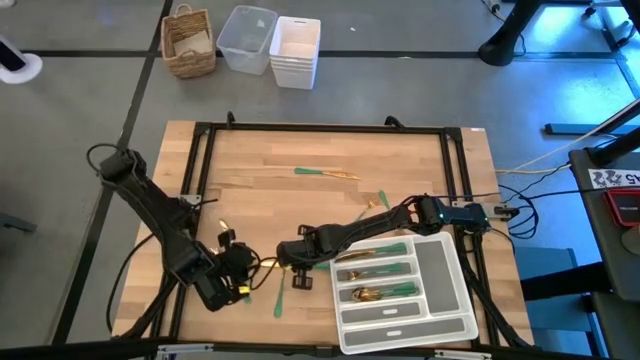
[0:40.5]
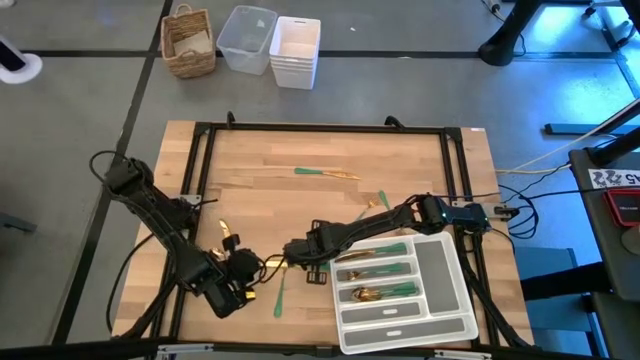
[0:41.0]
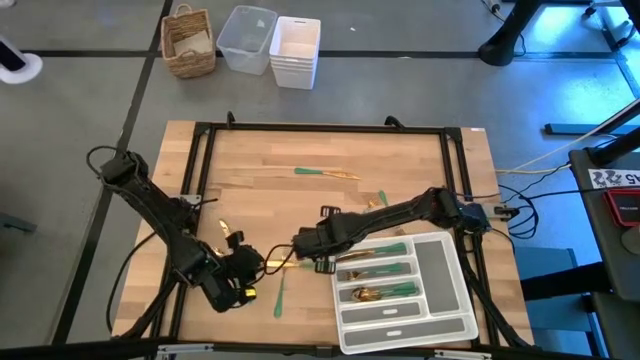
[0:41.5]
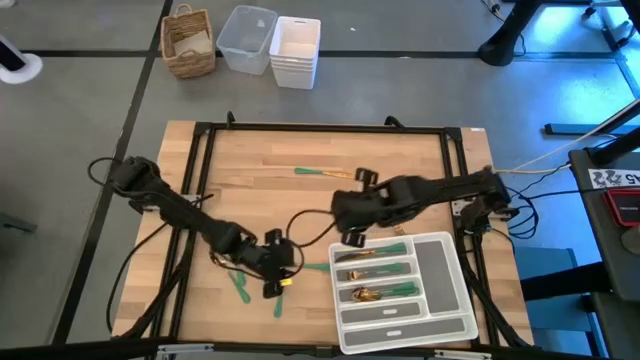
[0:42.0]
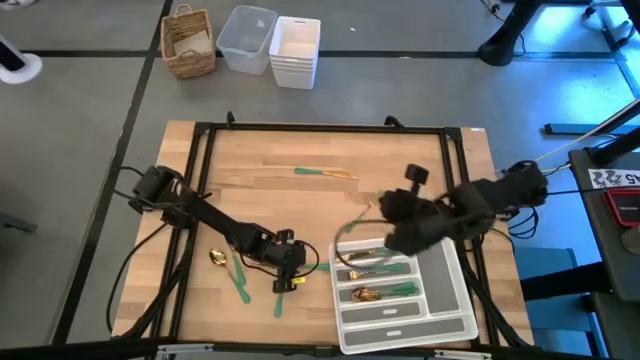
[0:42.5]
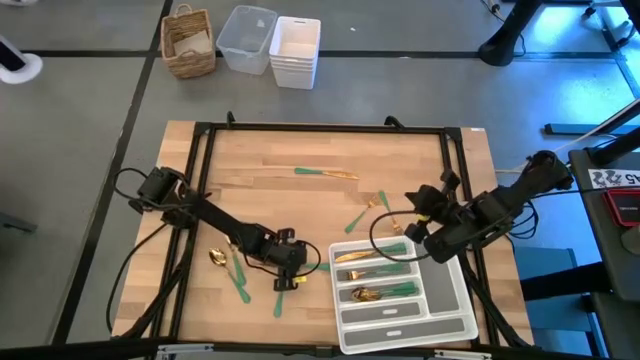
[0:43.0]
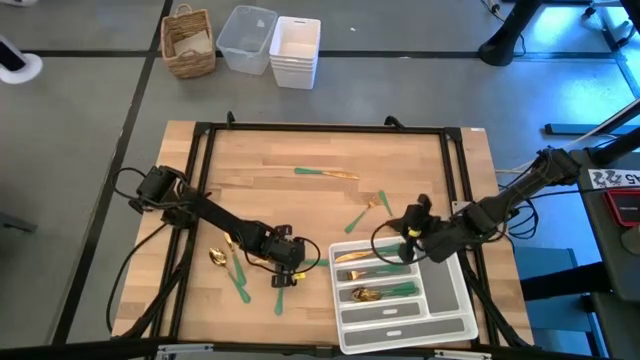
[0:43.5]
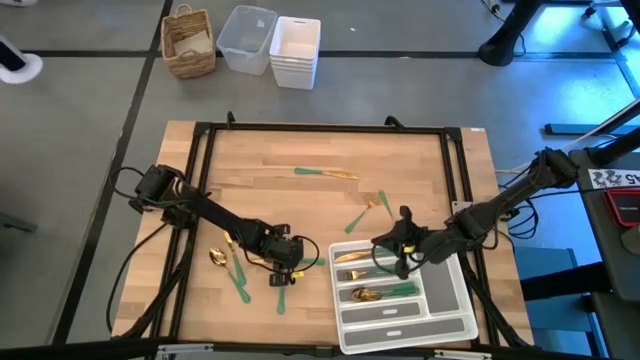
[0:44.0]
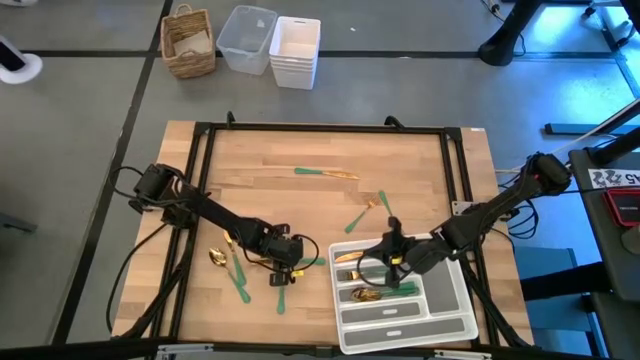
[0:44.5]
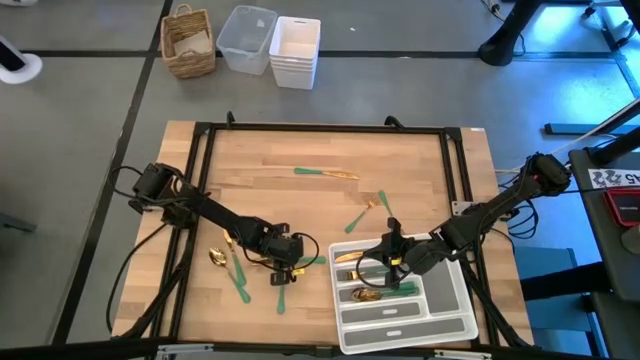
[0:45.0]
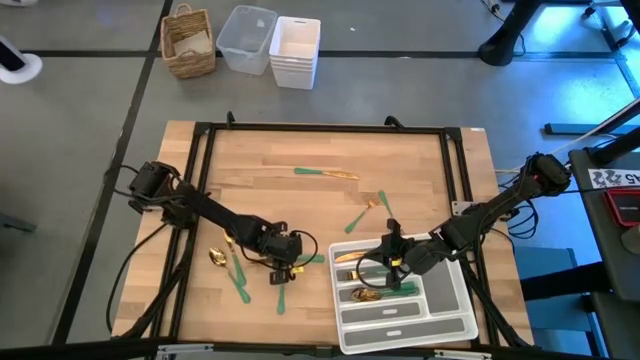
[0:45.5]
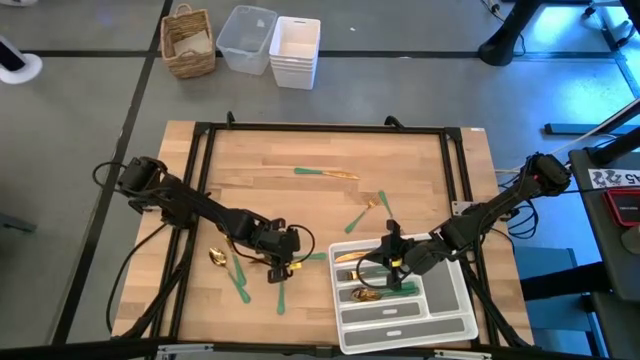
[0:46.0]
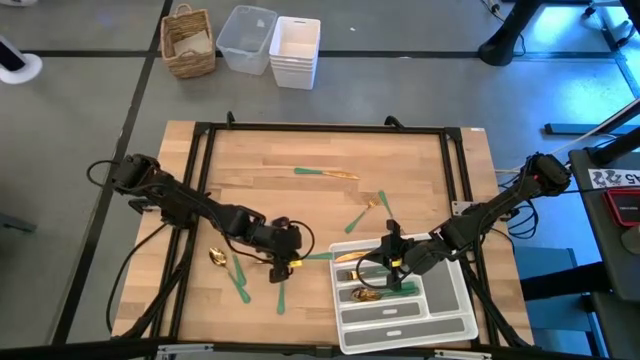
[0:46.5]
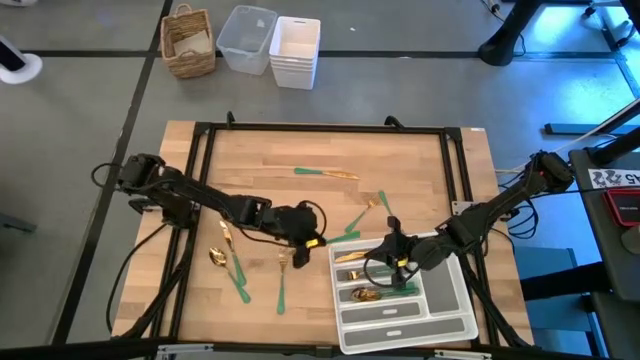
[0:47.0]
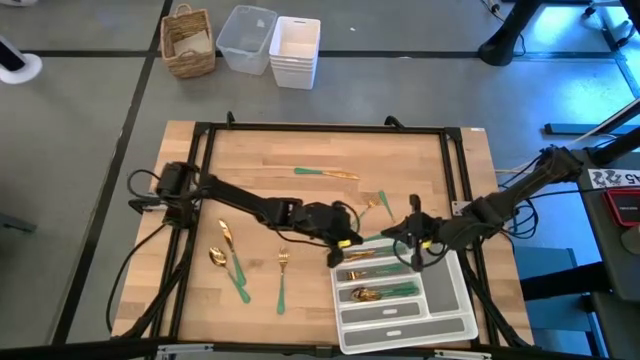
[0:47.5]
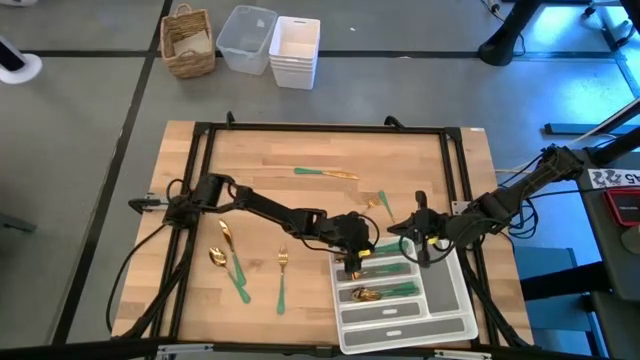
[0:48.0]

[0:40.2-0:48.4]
Task: Sort silverware
Put the bottom right green table knife into the silverware tray

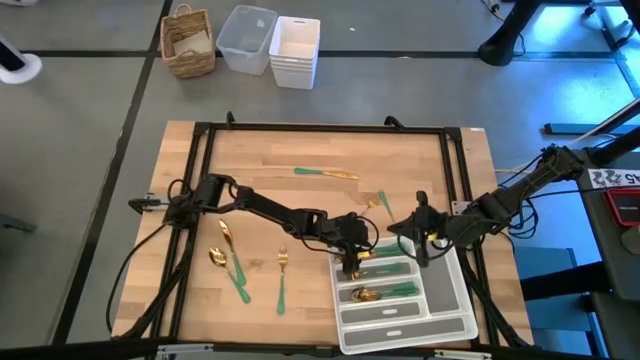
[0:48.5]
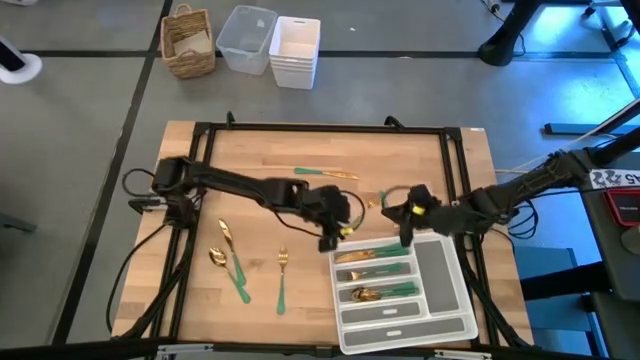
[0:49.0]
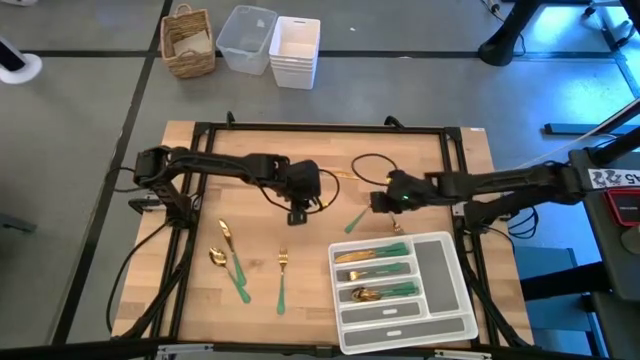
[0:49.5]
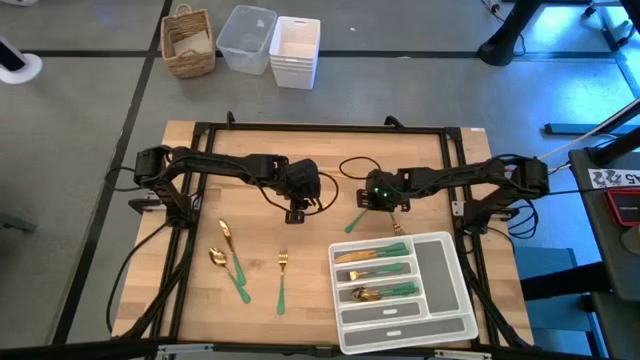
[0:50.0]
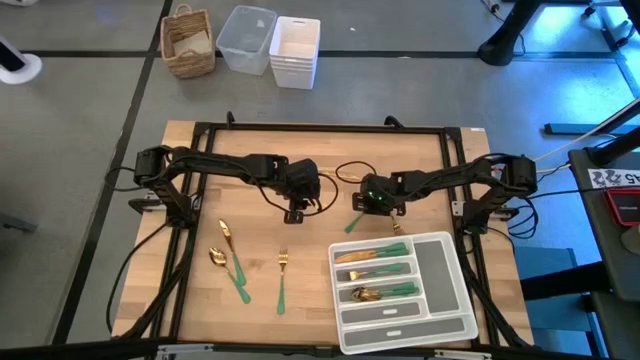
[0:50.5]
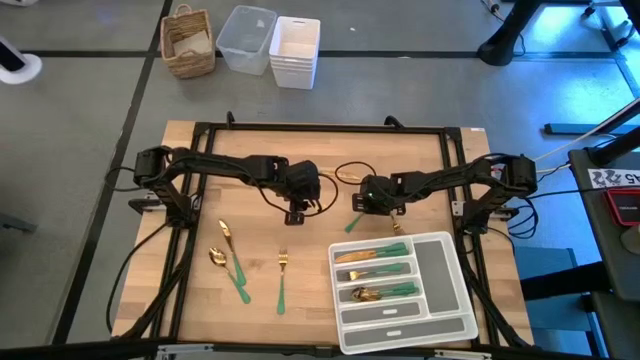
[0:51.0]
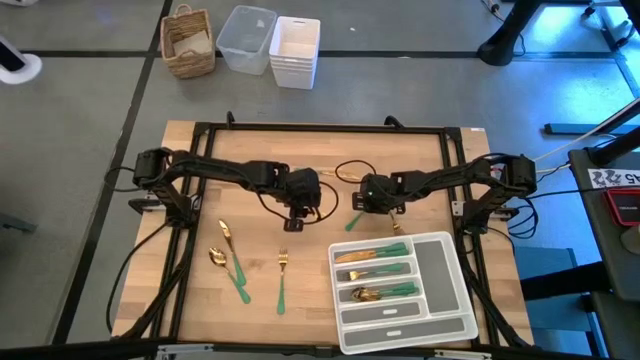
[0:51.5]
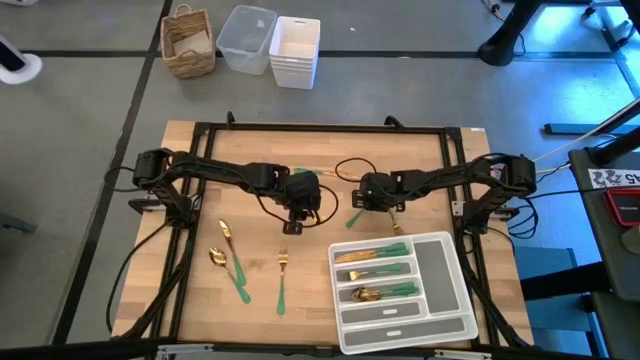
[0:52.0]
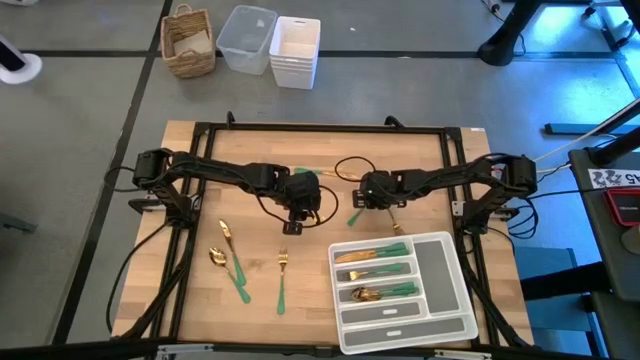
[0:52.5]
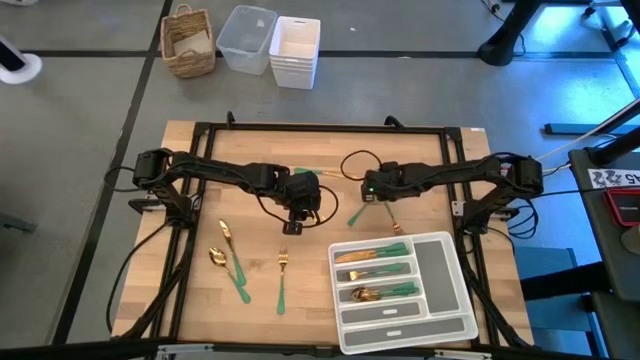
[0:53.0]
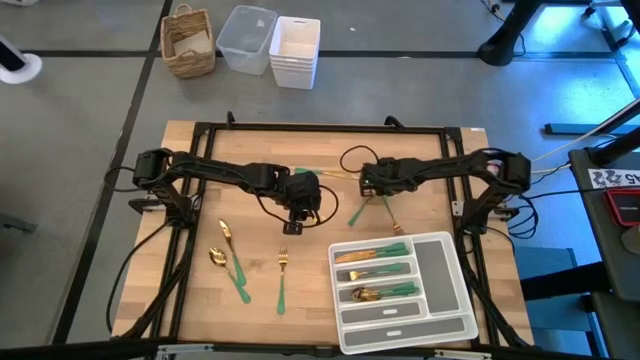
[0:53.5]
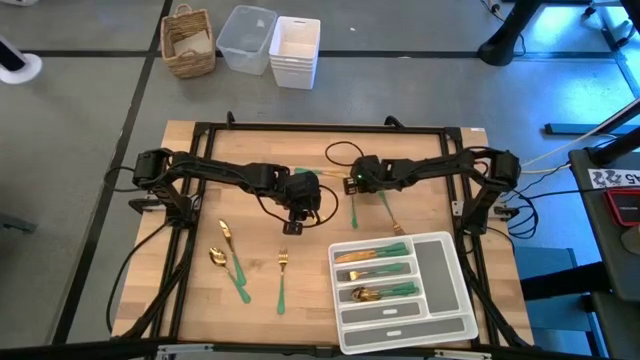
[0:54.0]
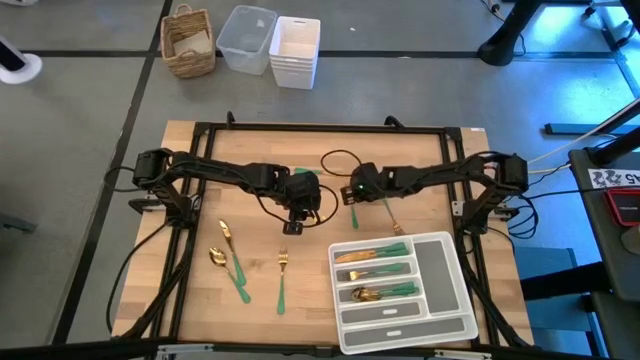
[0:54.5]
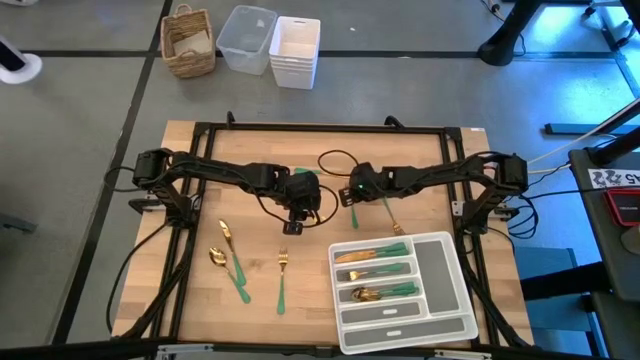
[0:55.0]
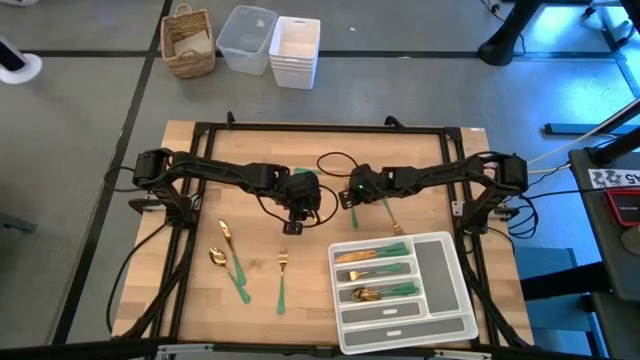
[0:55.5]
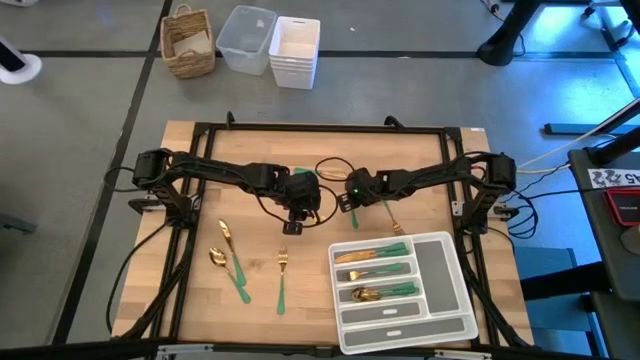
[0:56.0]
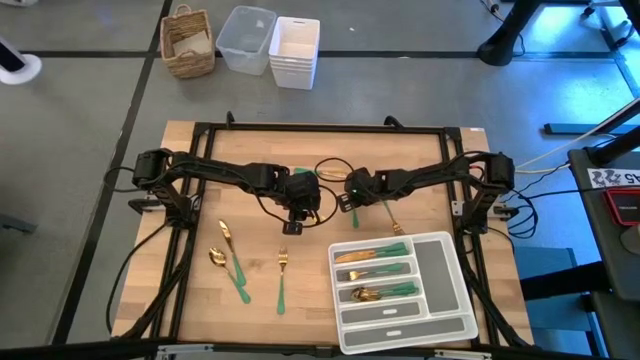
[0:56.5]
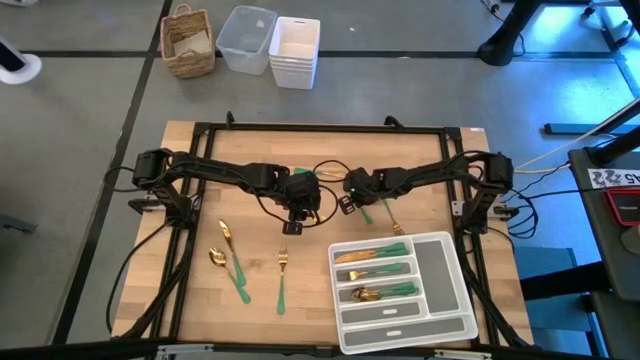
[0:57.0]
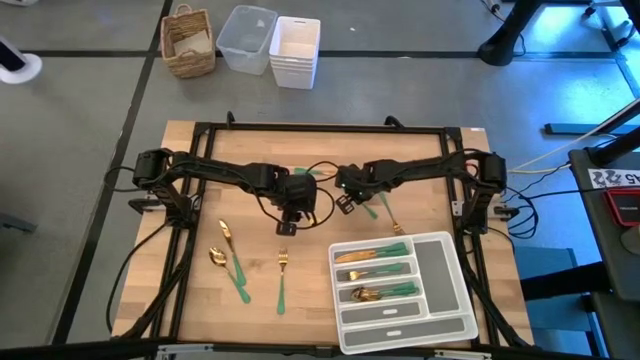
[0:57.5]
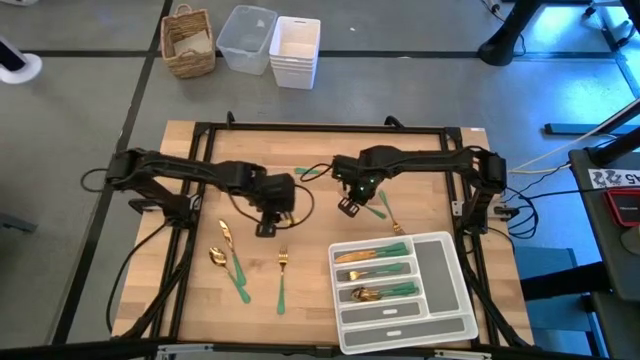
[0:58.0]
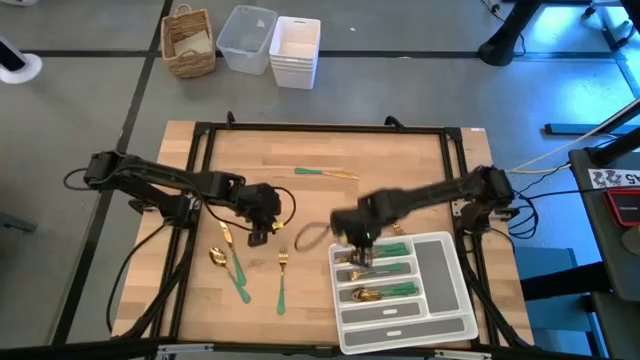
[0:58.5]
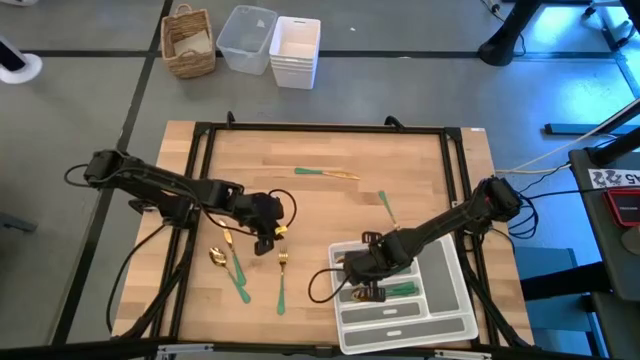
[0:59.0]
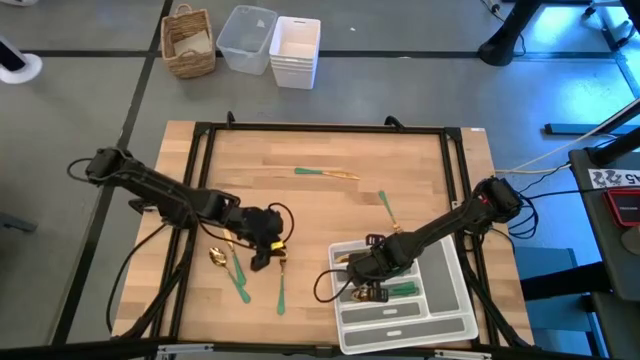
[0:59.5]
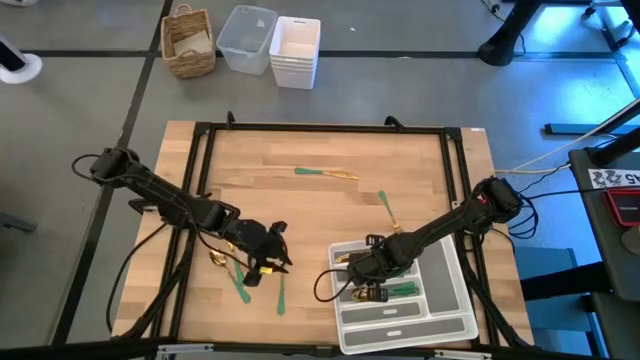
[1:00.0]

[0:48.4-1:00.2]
Put the top left green fork into the silverware tray

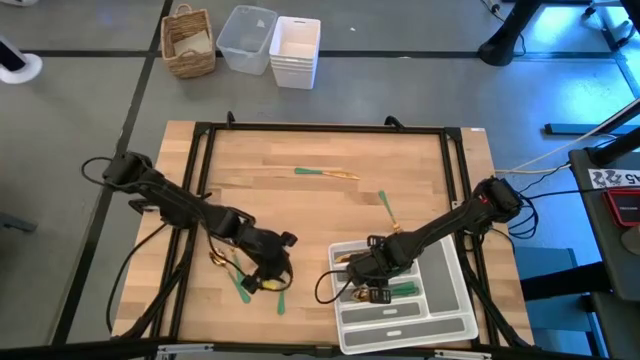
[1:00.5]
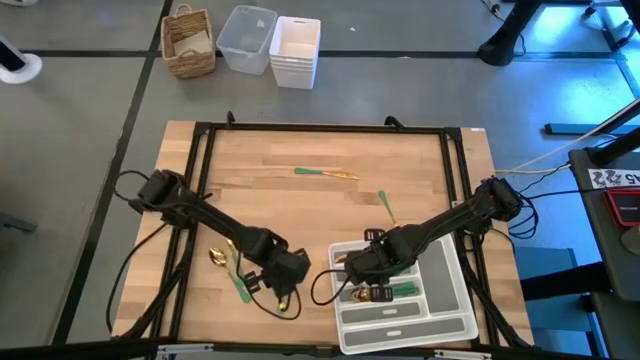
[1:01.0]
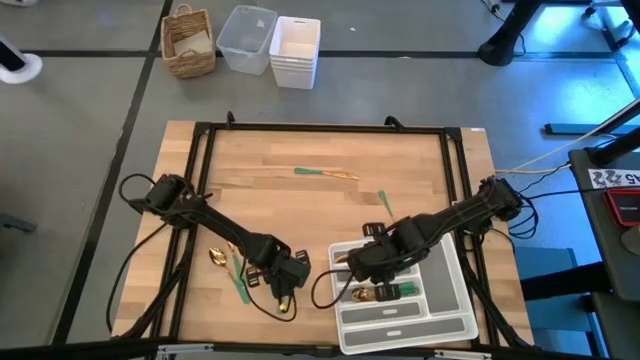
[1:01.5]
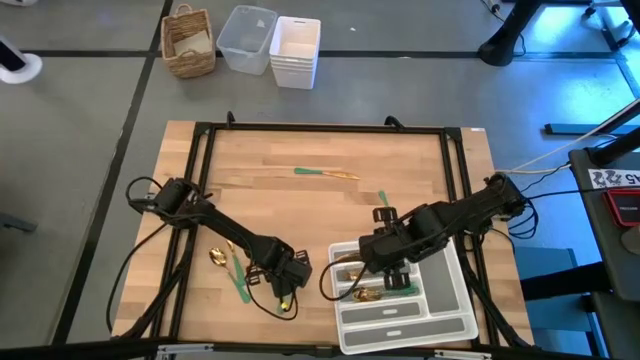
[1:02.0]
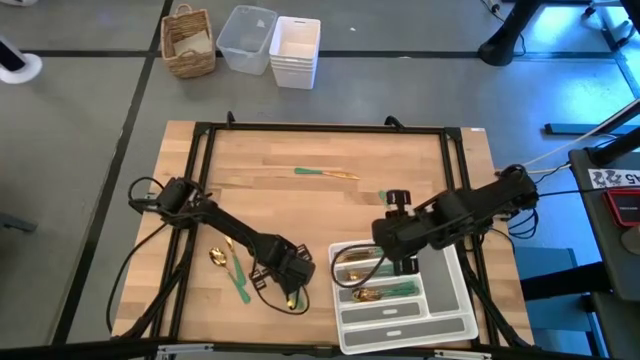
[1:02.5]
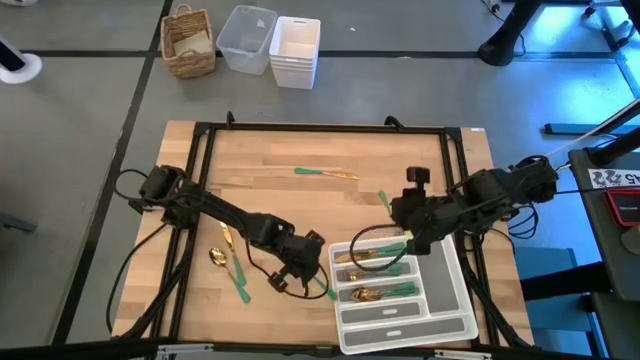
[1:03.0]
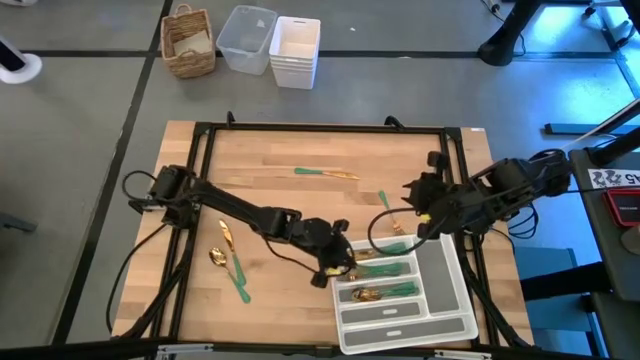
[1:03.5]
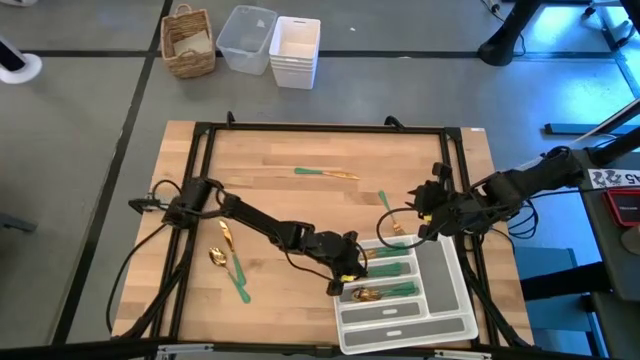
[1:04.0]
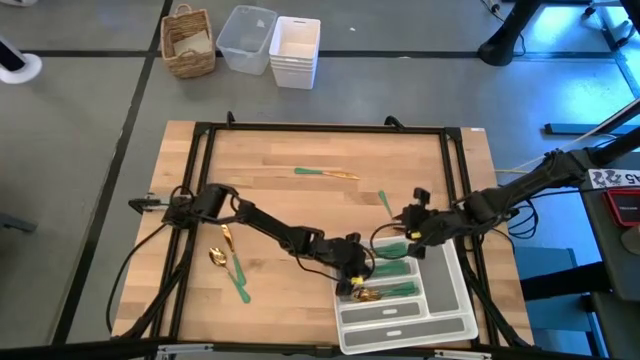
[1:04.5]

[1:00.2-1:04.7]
Put the bottom green fork into the silverware tray
